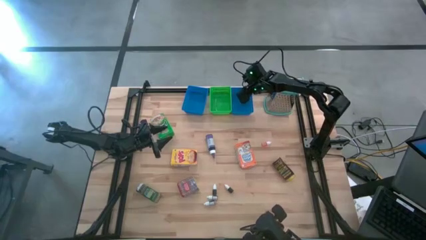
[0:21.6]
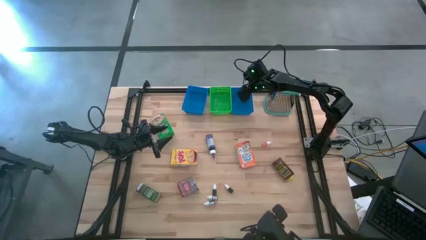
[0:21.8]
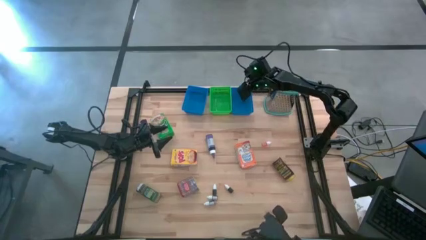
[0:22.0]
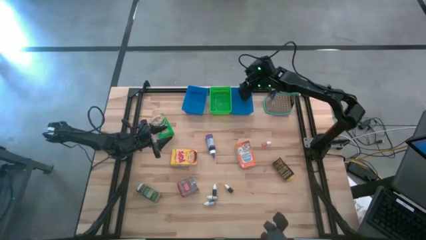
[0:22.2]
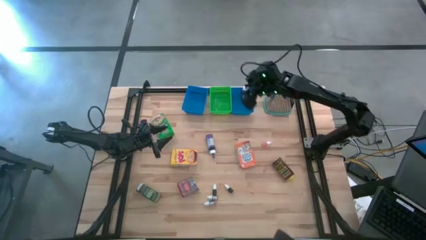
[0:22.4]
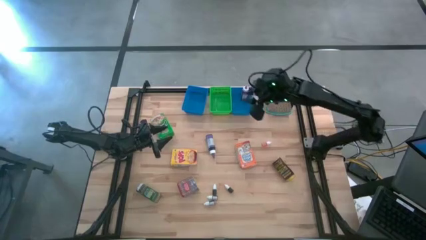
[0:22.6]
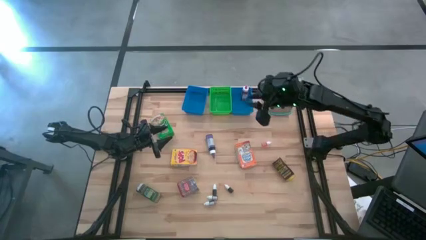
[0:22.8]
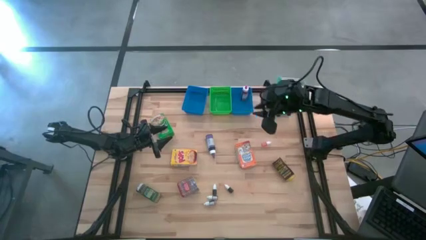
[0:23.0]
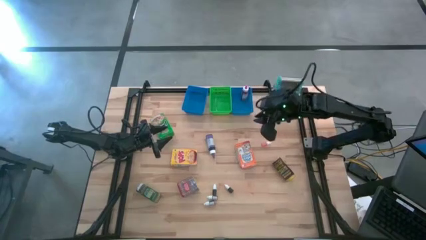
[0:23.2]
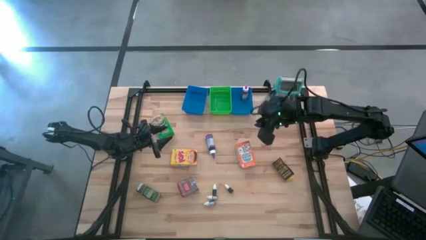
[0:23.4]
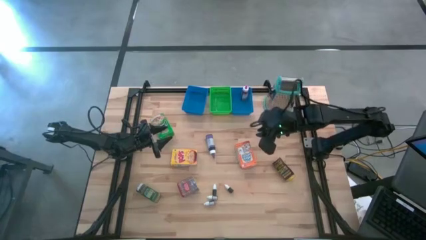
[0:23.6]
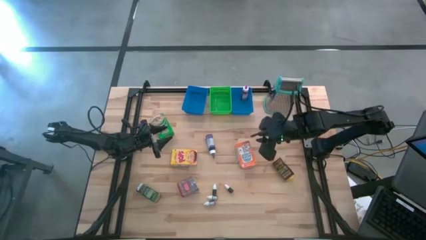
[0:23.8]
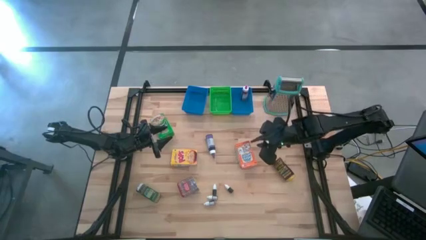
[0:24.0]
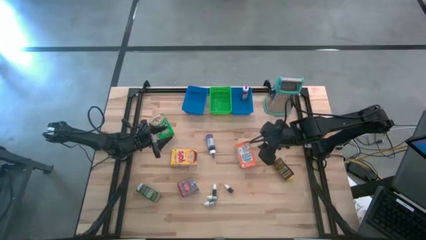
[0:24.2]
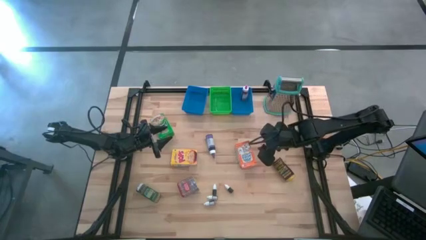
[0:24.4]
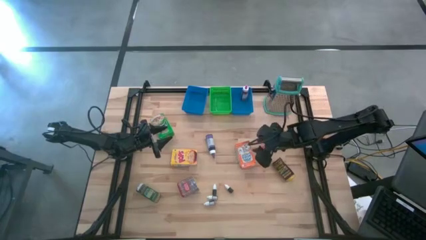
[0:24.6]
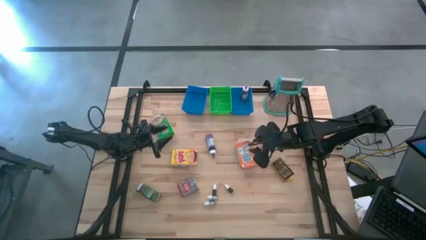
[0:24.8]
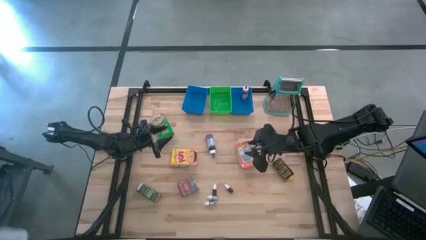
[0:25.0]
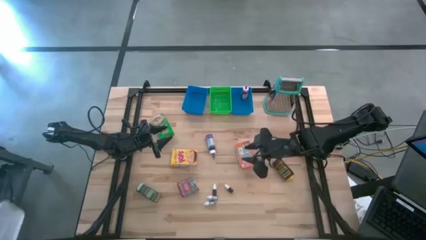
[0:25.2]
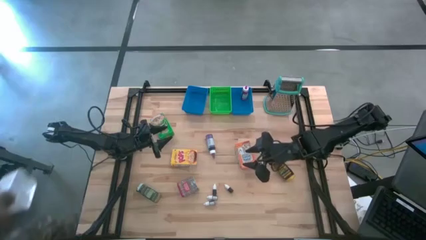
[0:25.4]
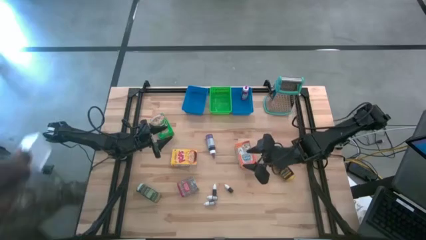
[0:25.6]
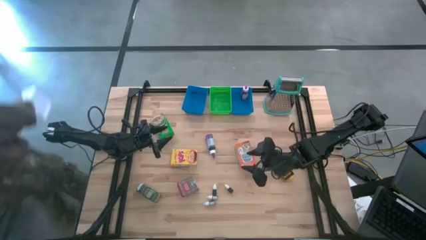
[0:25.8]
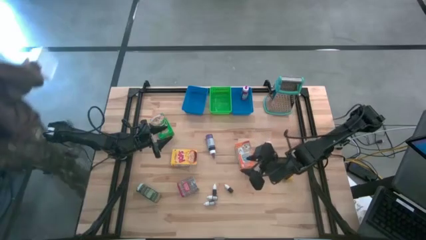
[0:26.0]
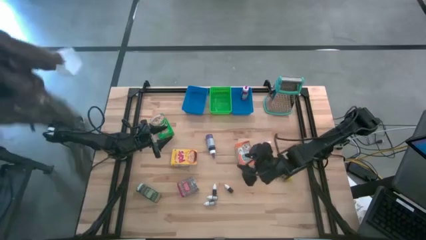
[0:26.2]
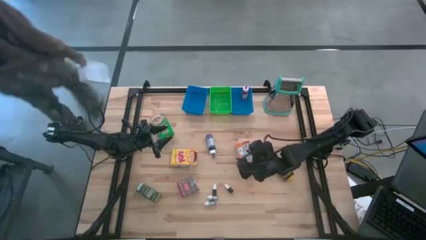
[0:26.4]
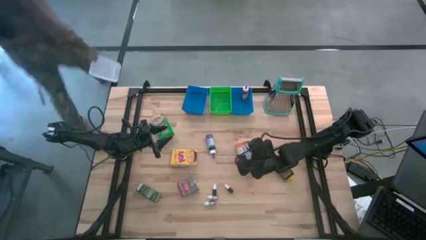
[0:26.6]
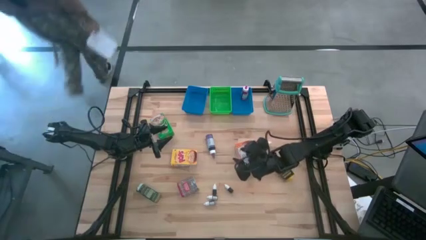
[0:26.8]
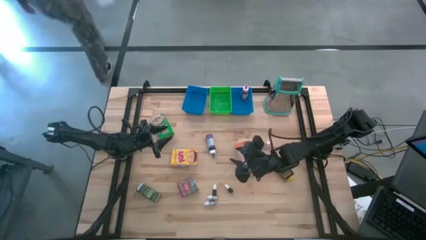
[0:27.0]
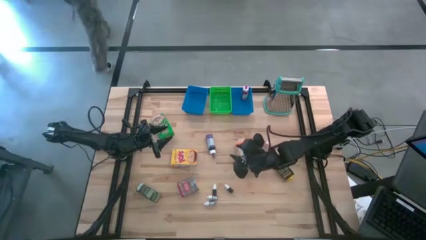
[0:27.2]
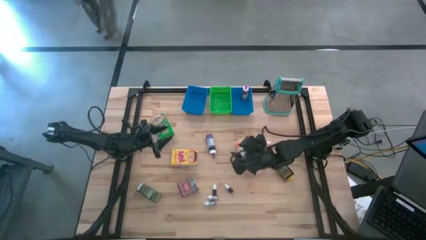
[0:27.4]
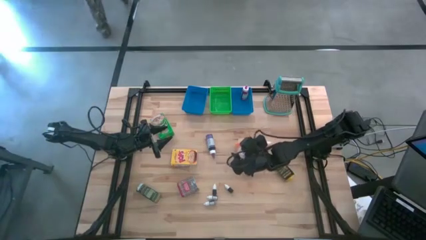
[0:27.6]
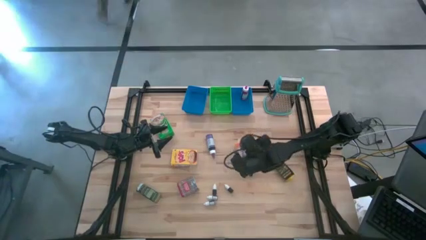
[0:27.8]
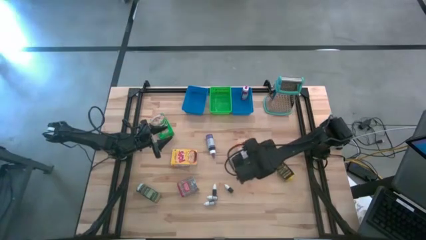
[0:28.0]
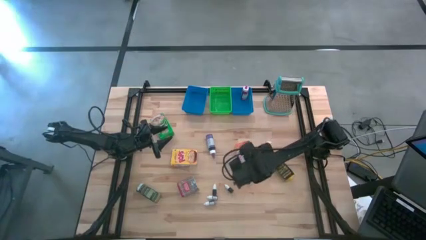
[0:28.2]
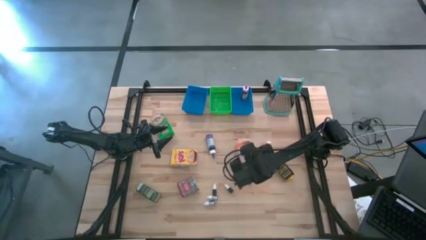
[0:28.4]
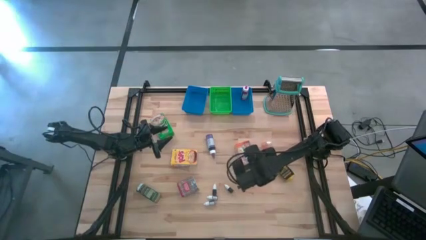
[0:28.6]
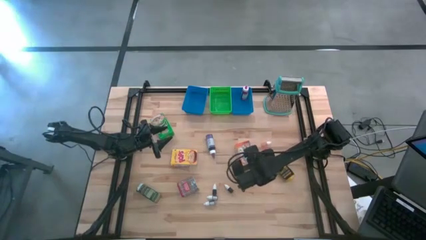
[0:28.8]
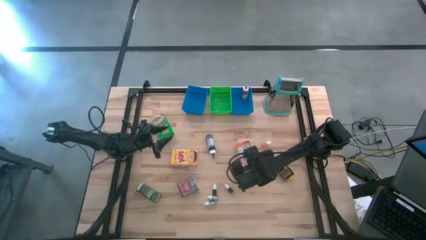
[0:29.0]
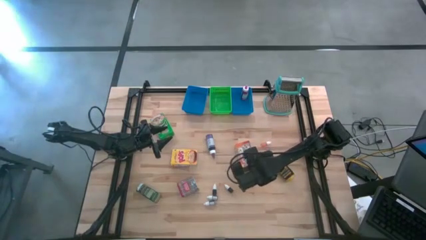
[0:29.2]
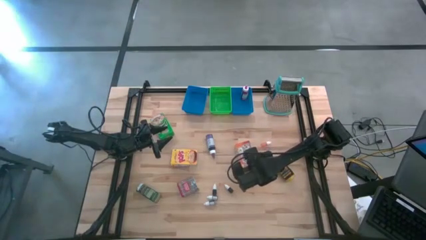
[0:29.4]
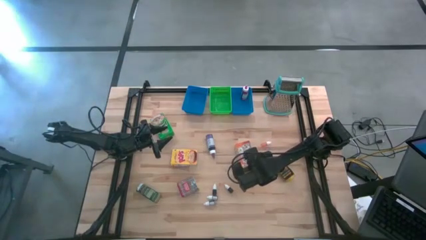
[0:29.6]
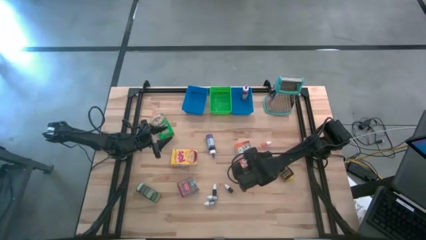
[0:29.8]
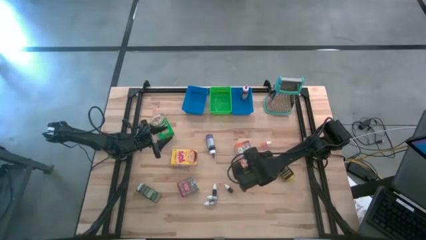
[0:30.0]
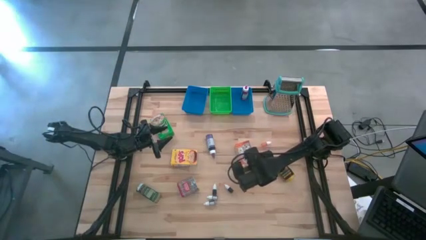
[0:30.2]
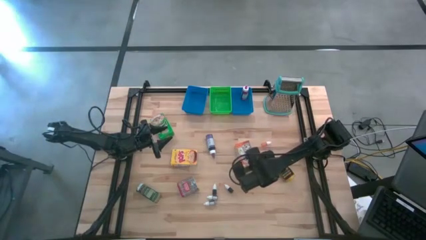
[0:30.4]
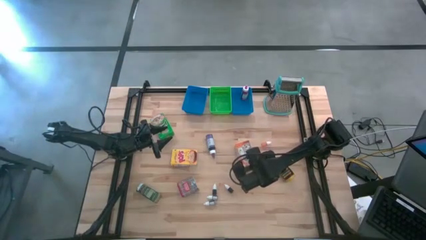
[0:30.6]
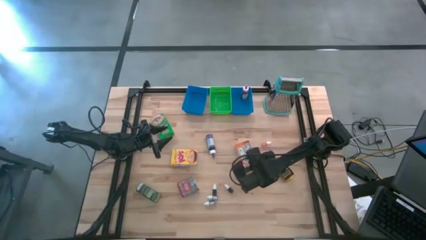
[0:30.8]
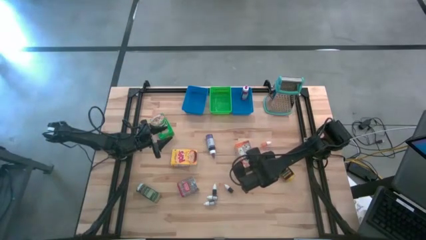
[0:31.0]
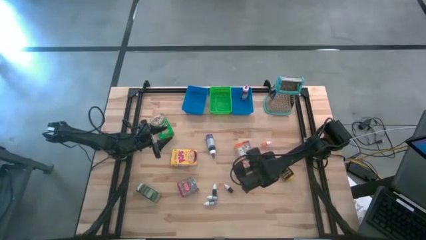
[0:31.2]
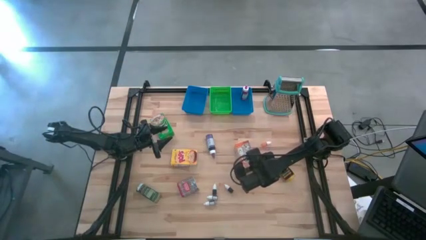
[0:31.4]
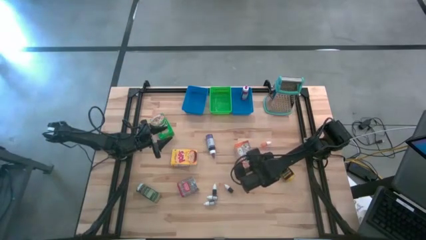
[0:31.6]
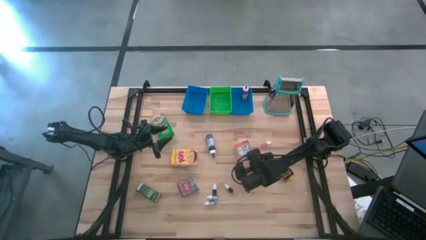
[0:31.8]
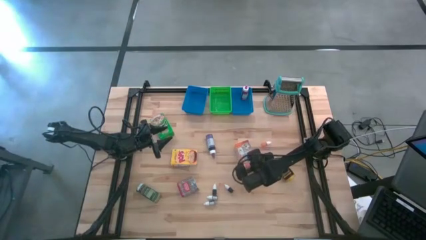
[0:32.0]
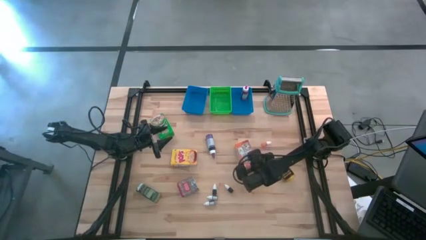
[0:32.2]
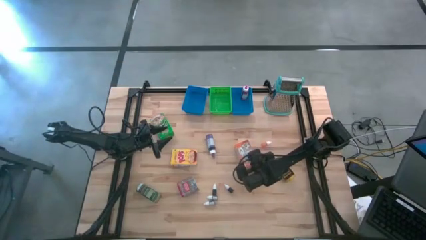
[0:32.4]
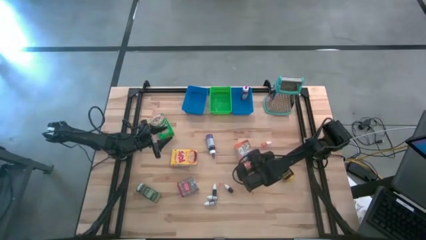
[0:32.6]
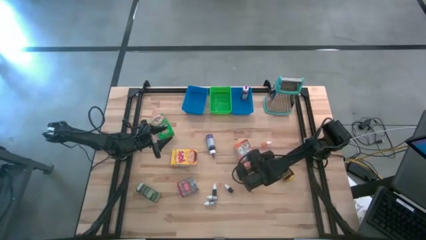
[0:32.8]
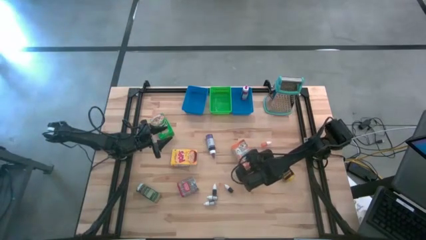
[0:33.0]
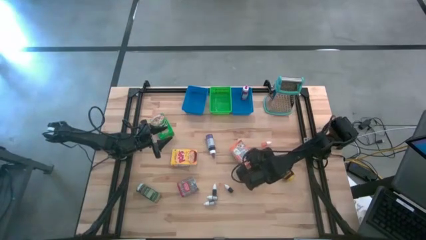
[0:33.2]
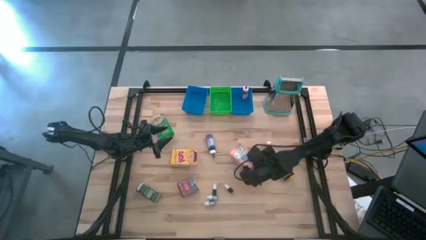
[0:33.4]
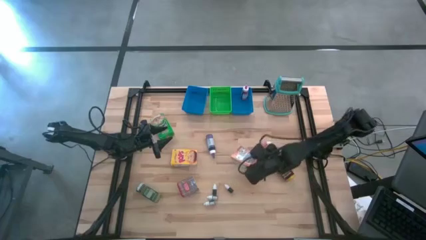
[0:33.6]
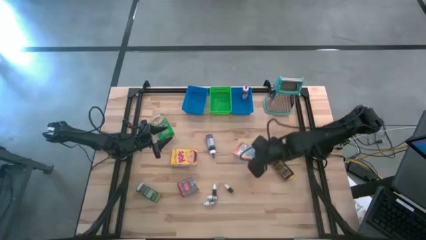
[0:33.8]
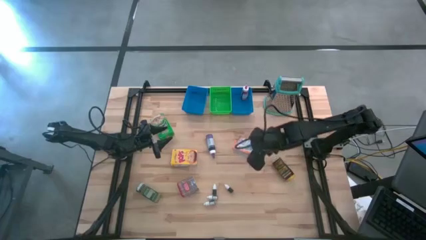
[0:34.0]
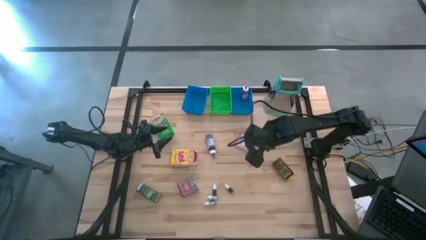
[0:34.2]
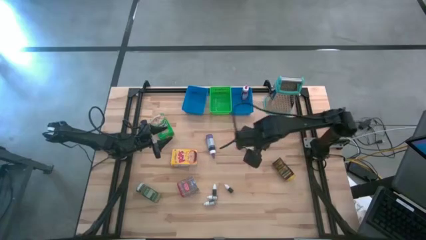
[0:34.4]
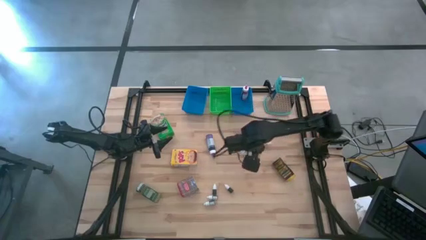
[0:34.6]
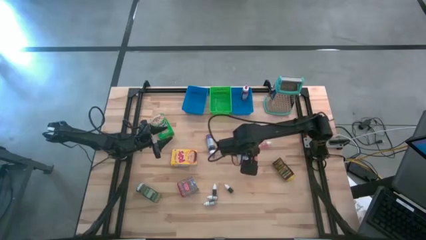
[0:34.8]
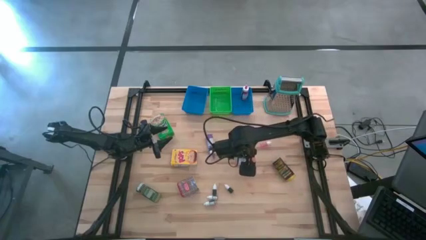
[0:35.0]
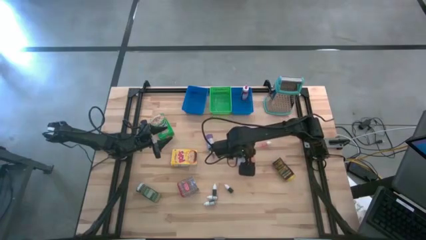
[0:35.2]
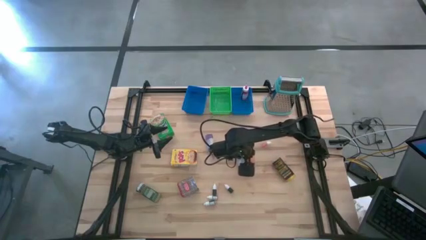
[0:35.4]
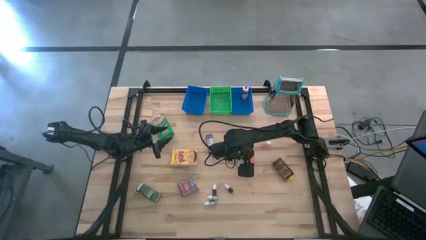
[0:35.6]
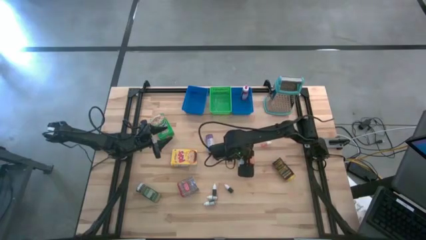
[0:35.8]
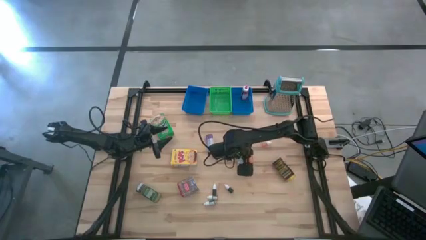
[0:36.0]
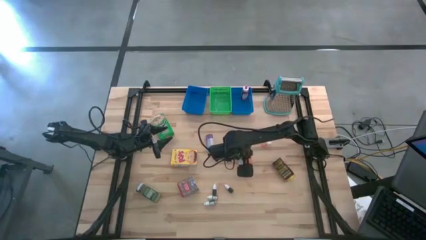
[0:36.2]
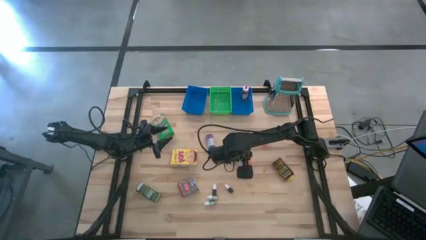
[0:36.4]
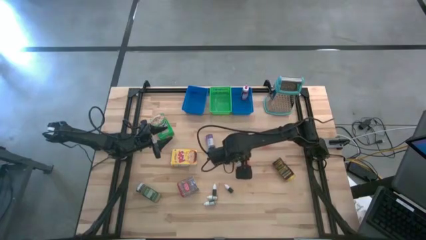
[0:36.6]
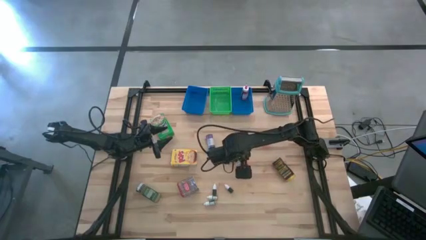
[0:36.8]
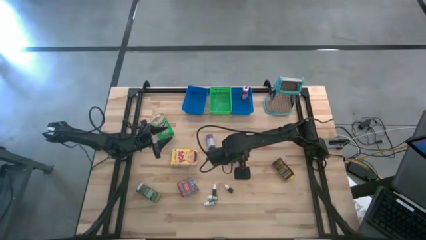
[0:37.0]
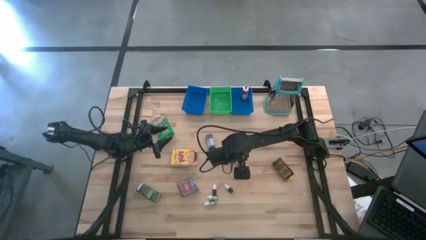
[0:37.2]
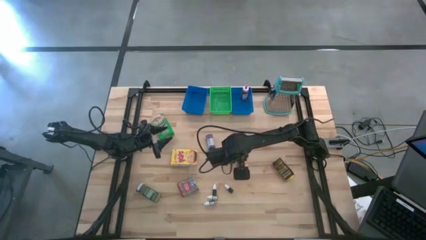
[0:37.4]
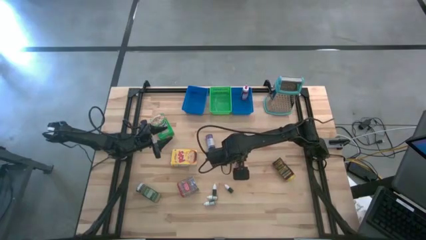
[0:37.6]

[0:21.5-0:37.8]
Task: Pick & Place Kitchen Items
Put the orange cereal box into the left blue bin

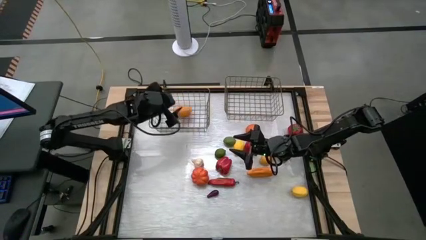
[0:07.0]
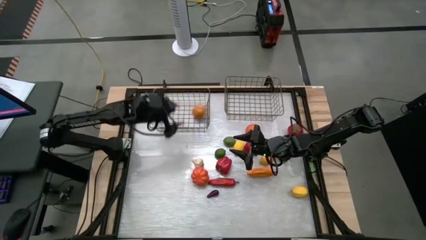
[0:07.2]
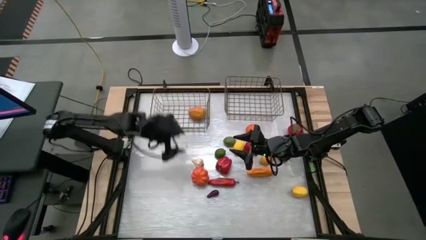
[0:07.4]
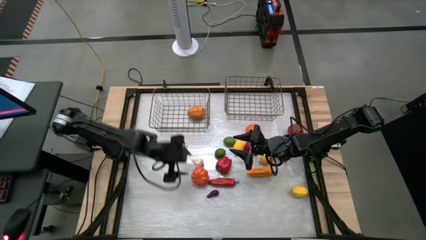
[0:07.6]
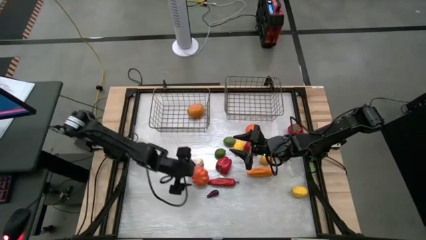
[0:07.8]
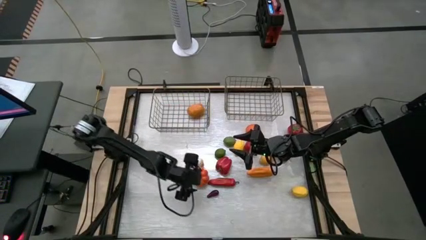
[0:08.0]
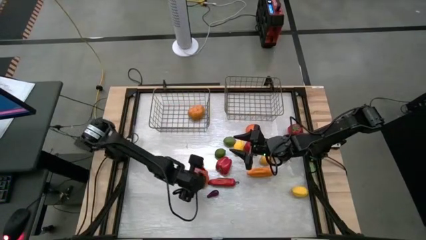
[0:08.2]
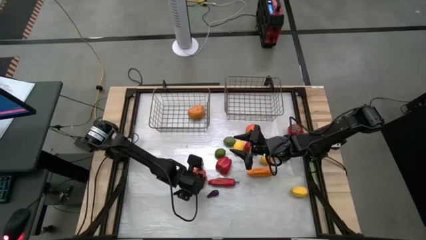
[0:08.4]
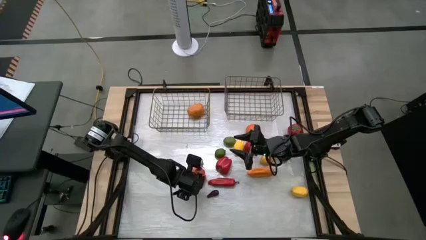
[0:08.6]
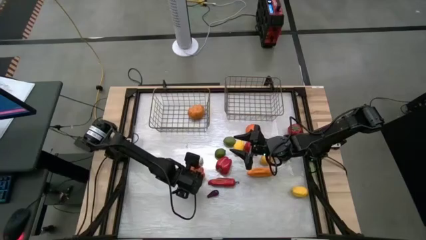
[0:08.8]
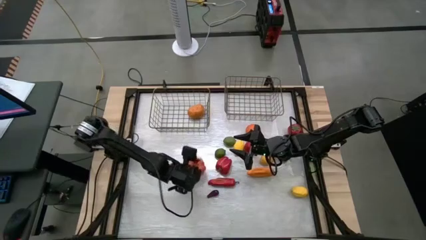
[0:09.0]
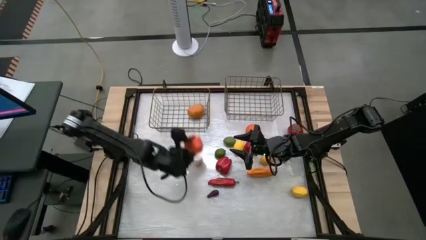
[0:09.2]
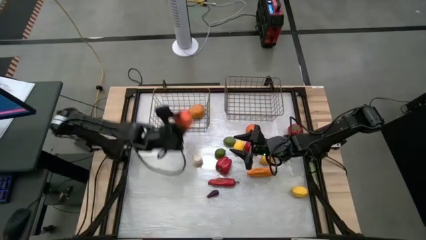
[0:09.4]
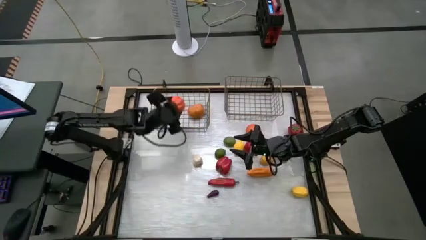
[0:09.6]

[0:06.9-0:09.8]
Task: Sort produce into baskets
Put the pumpkin into the left gold wire basket
